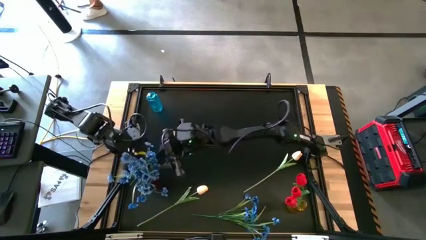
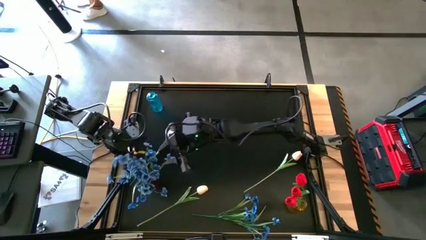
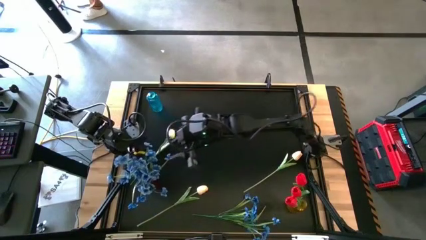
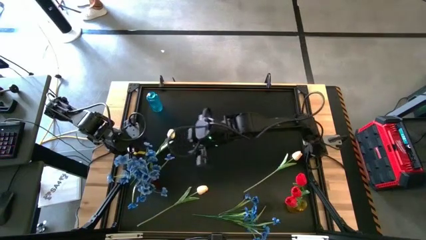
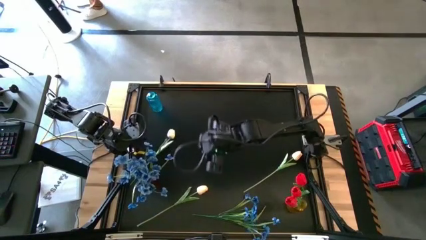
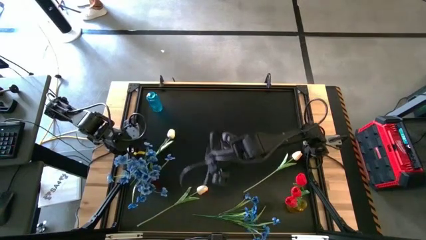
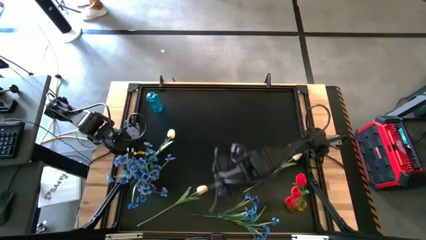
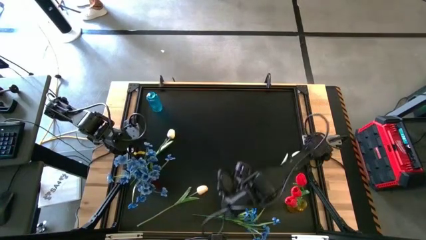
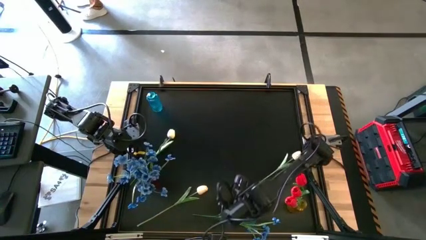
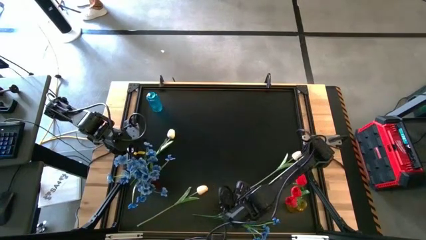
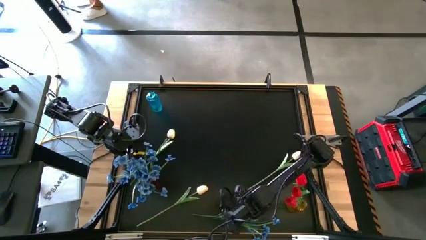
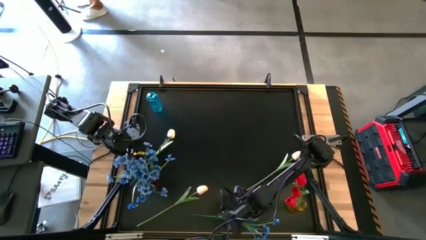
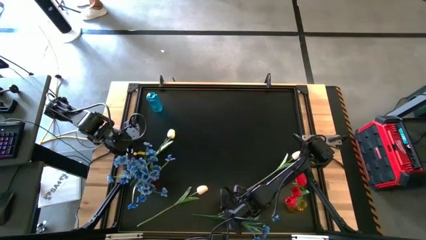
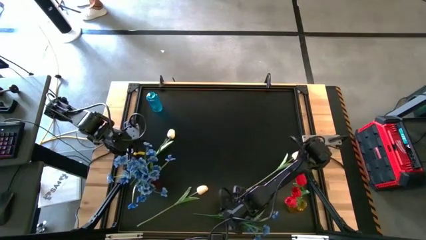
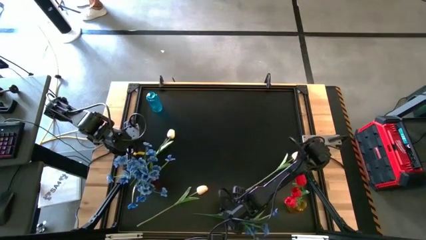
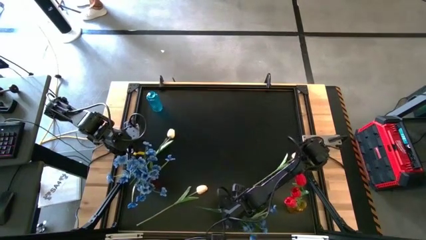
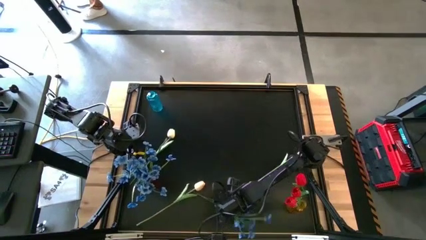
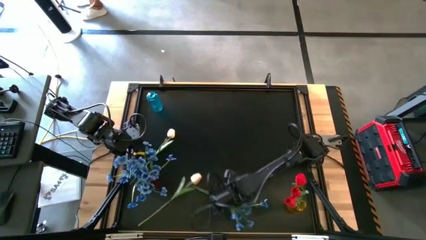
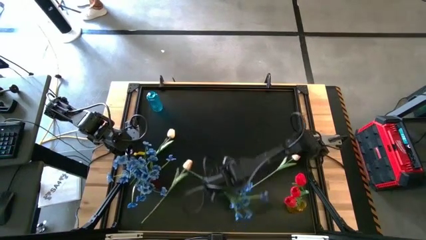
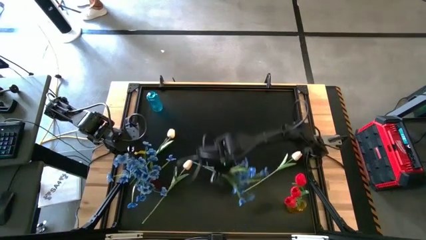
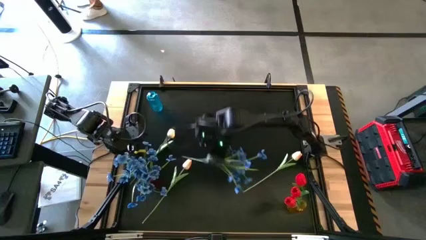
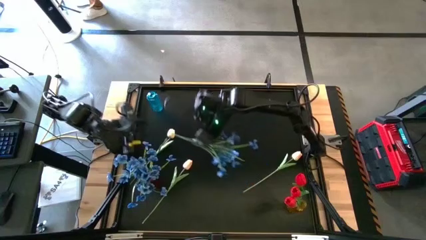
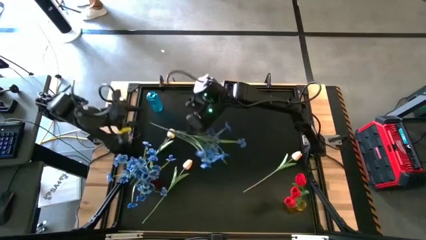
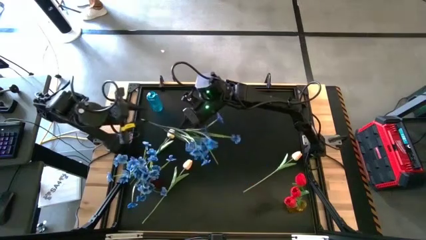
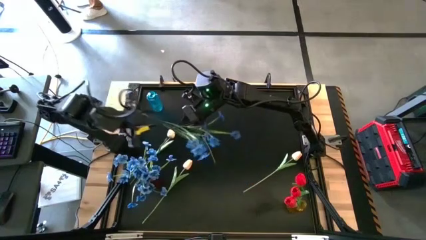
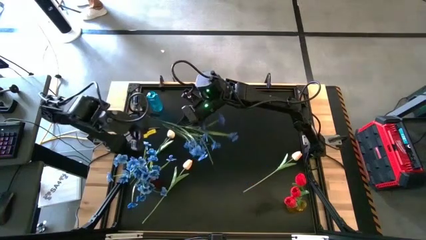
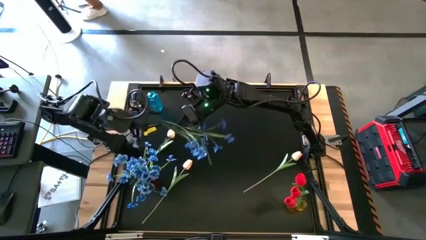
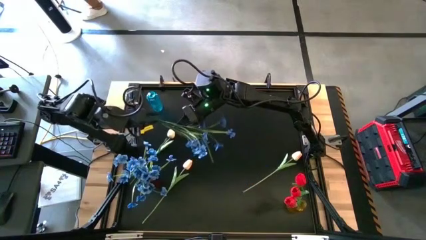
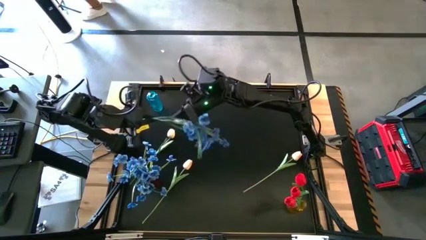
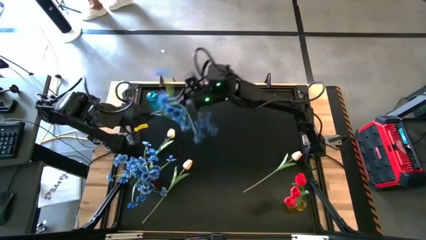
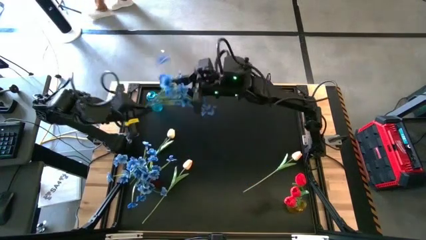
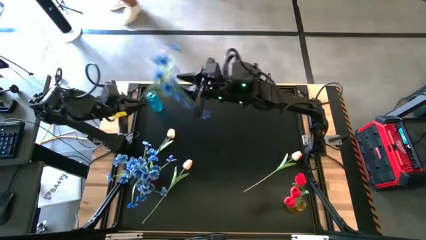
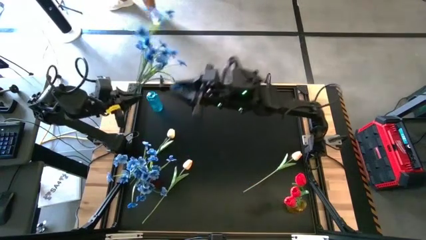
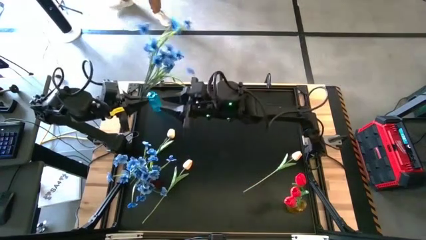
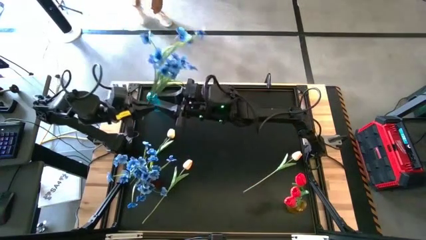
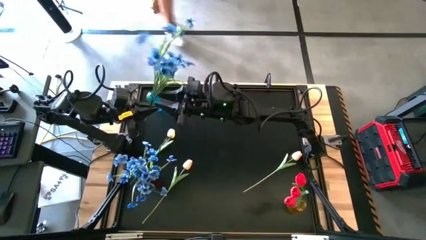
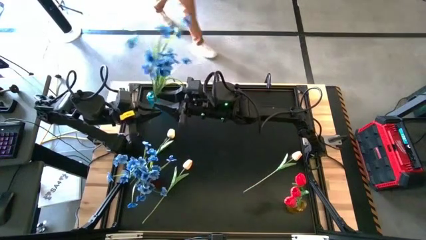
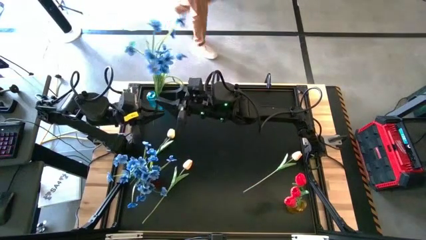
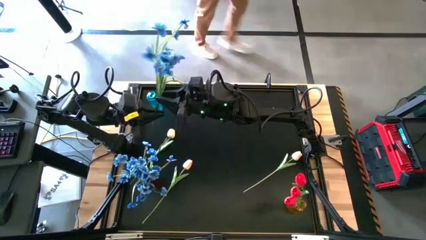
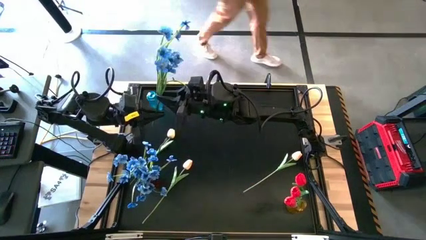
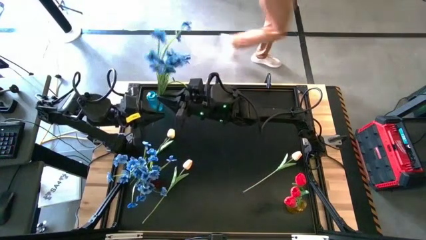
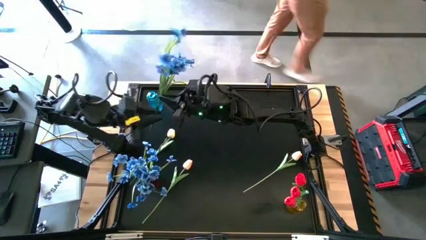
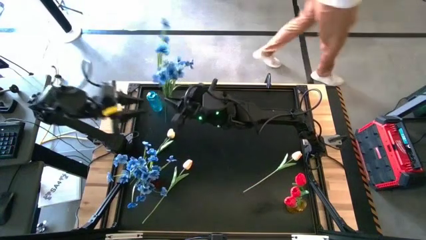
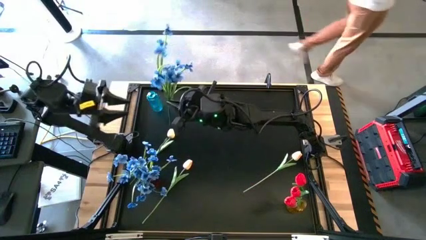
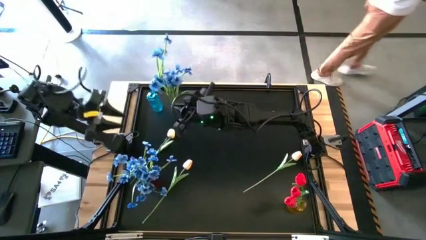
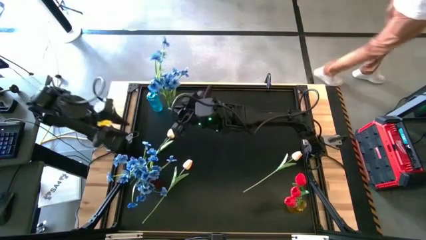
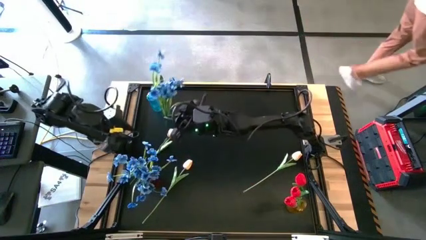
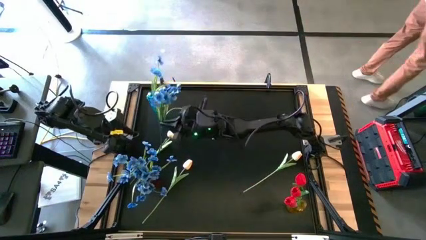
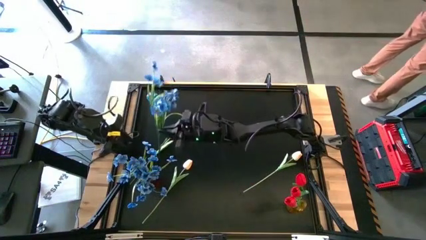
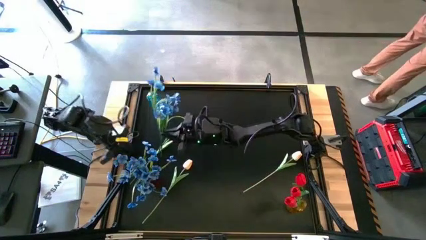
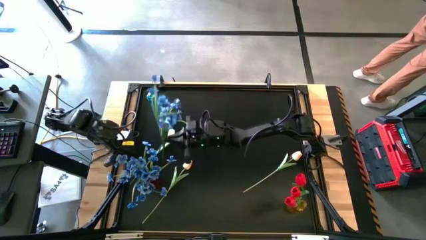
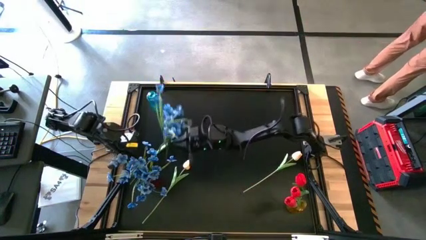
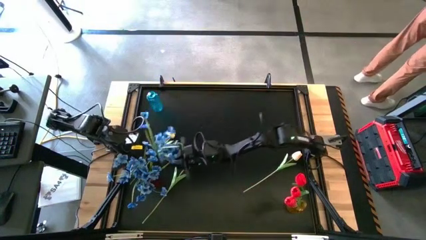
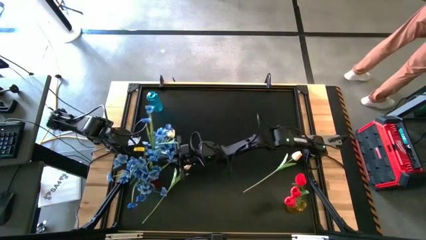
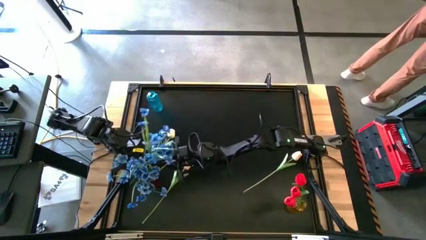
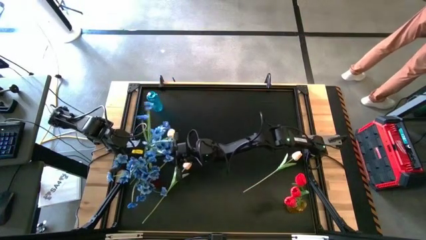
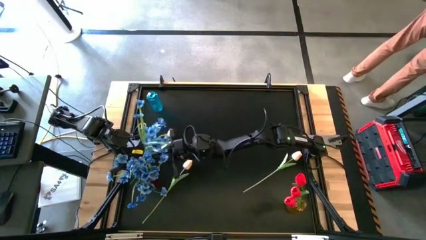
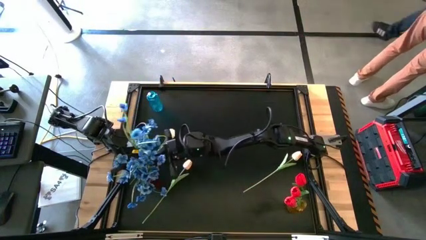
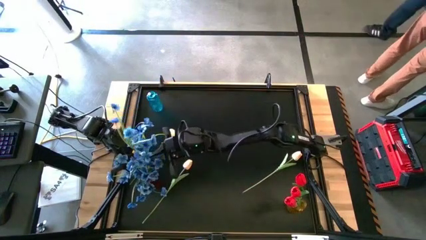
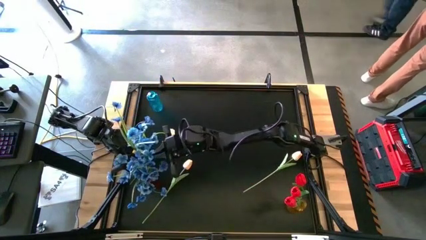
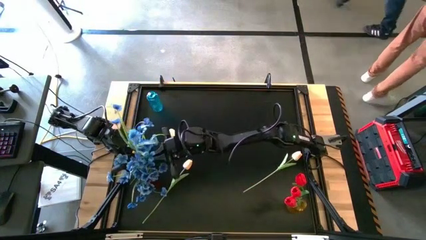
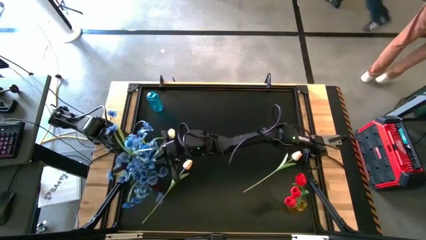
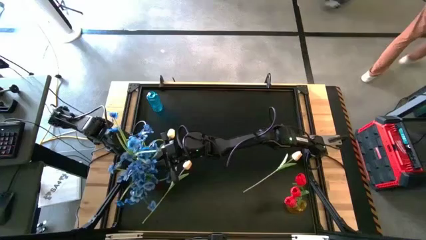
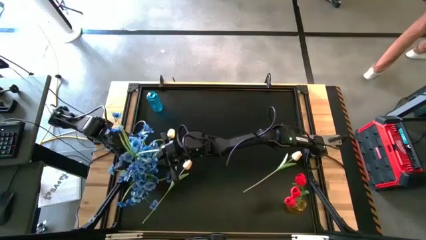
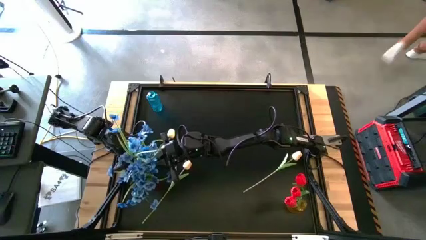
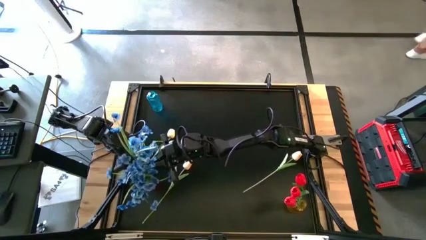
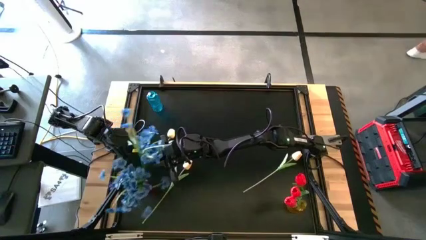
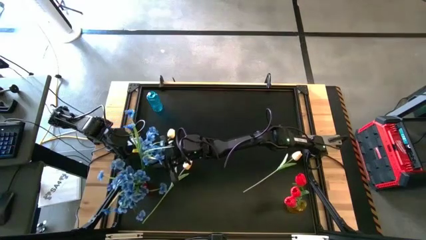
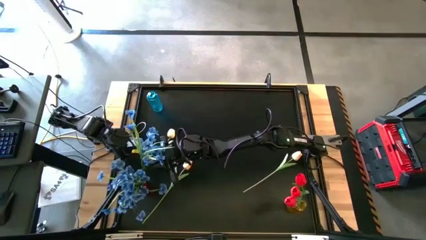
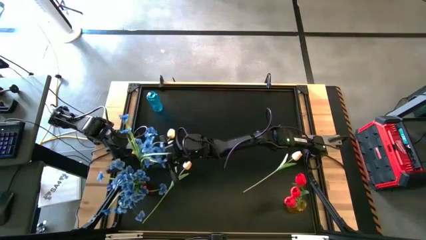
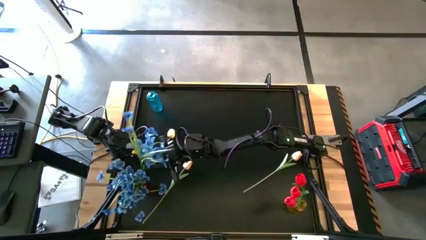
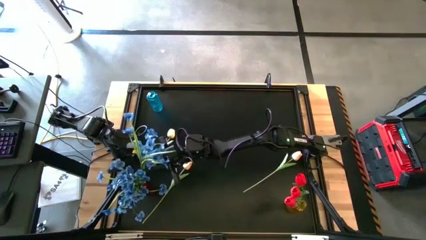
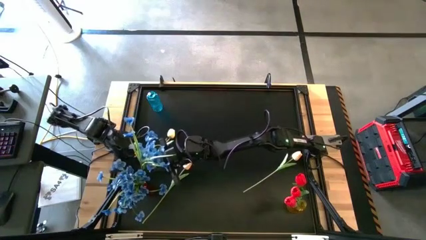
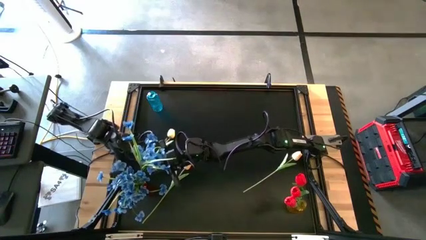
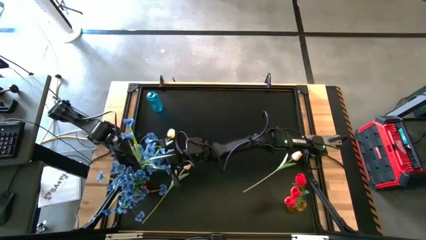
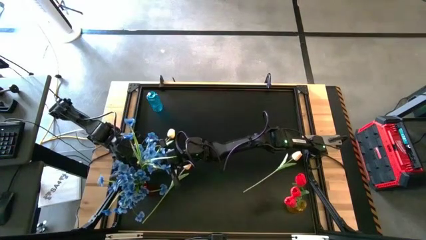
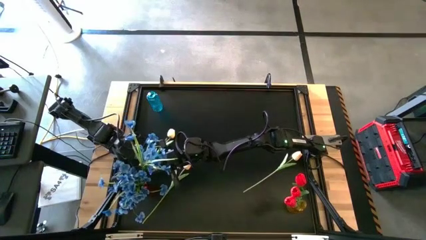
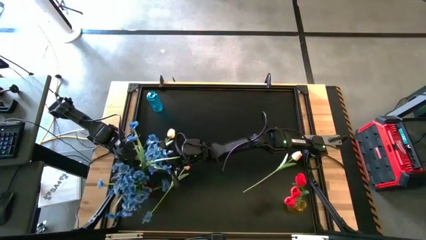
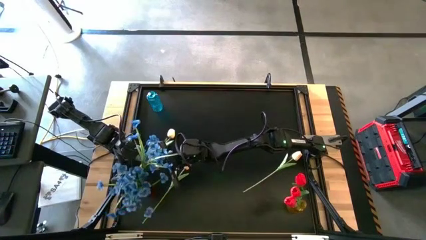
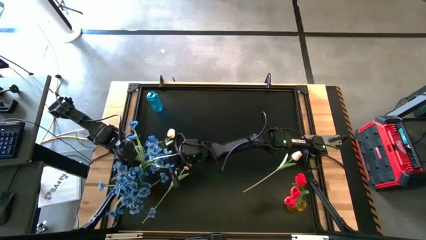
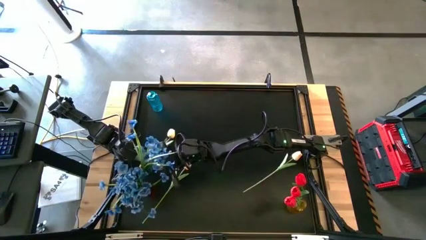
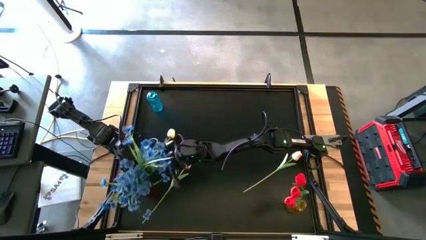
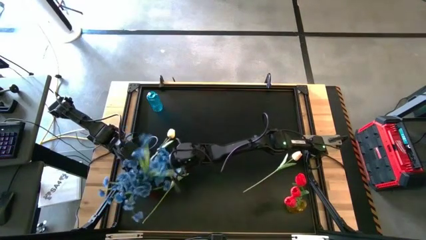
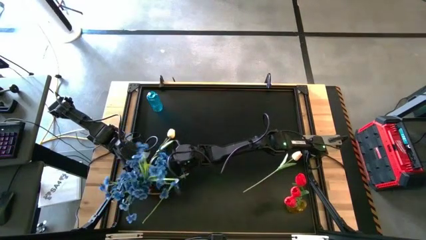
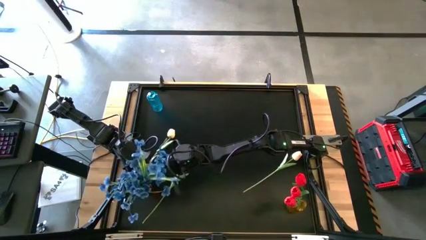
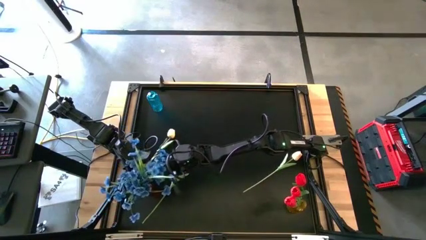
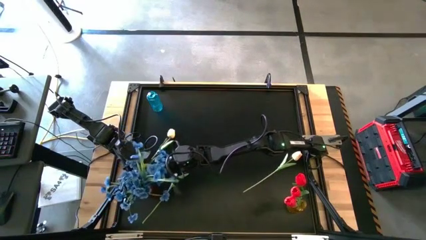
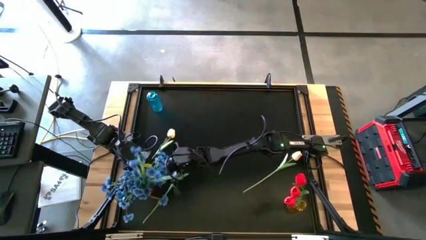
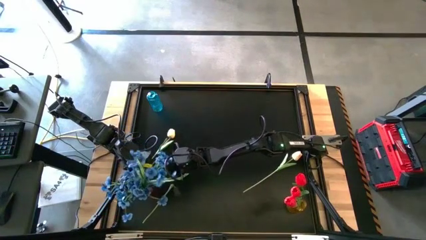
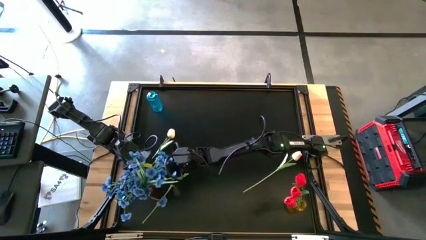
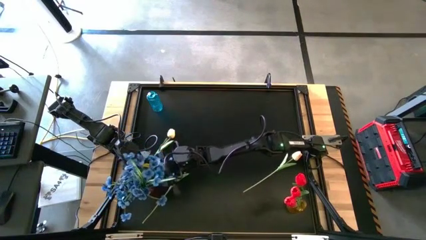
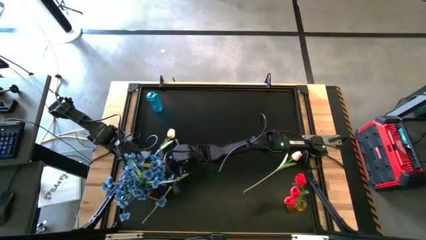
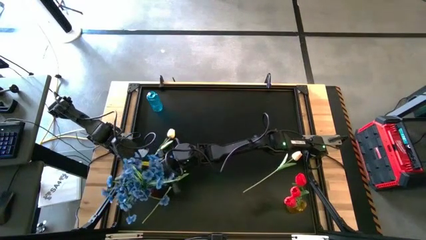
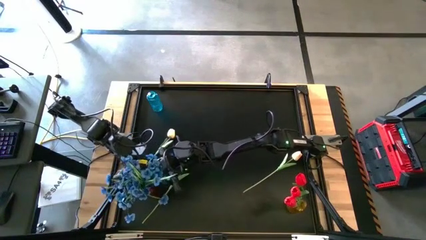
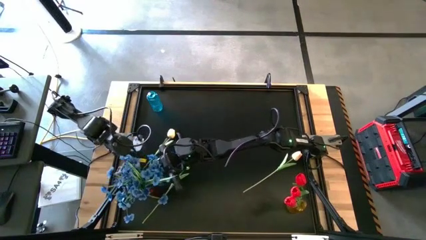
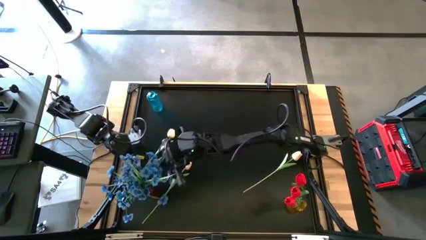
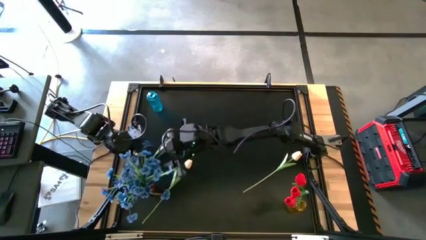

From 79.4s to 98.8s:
Task: Sort flowers into vase by color
Put the blue flowers into the red vase
